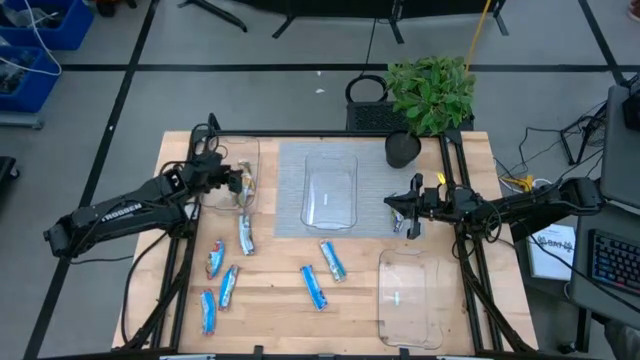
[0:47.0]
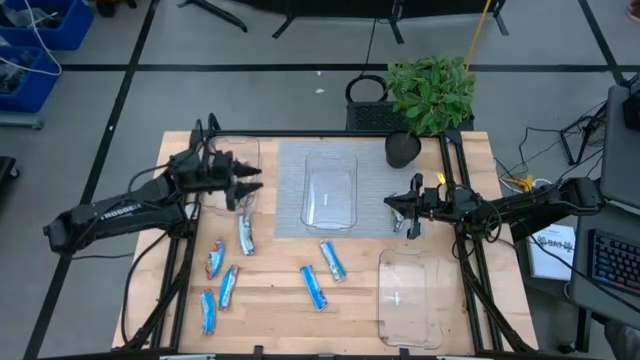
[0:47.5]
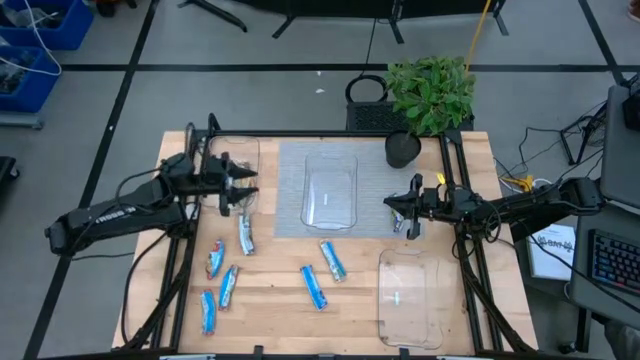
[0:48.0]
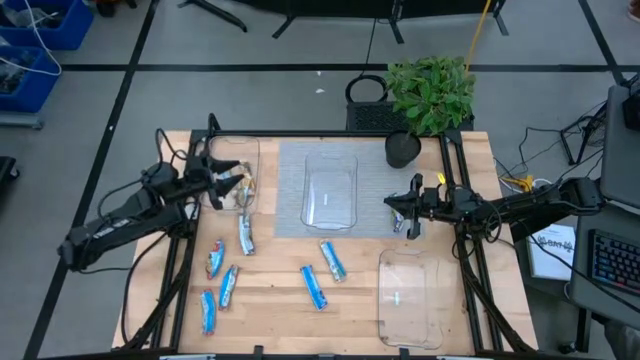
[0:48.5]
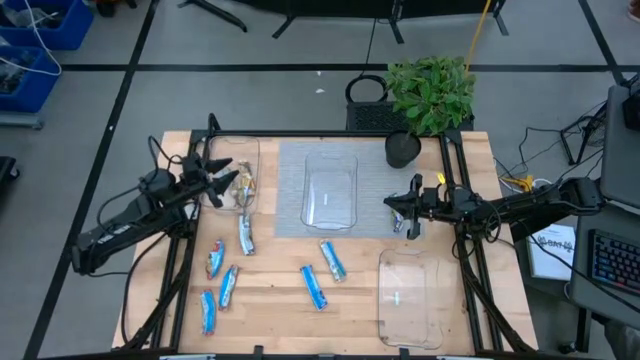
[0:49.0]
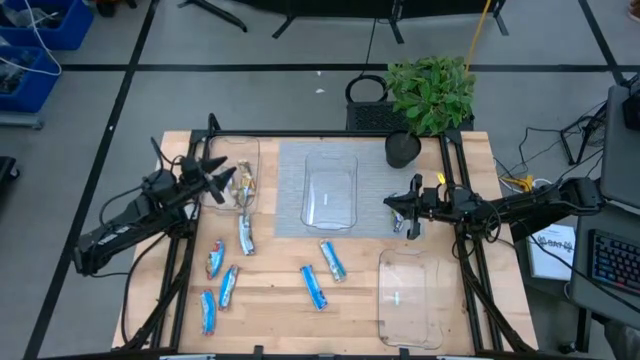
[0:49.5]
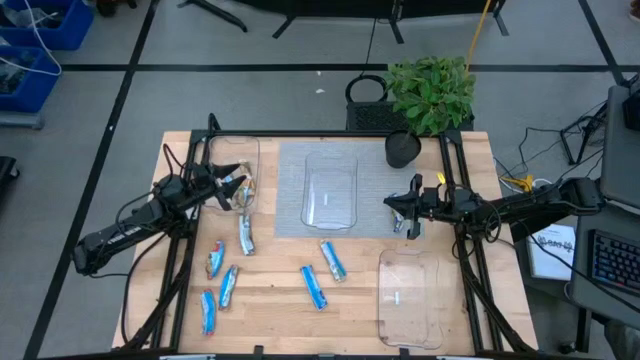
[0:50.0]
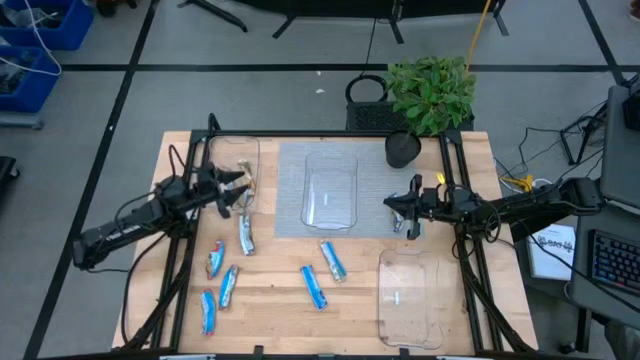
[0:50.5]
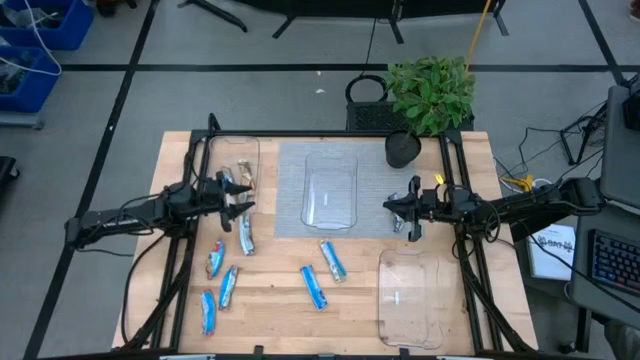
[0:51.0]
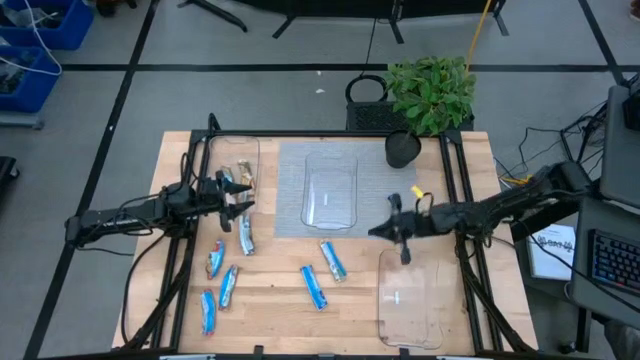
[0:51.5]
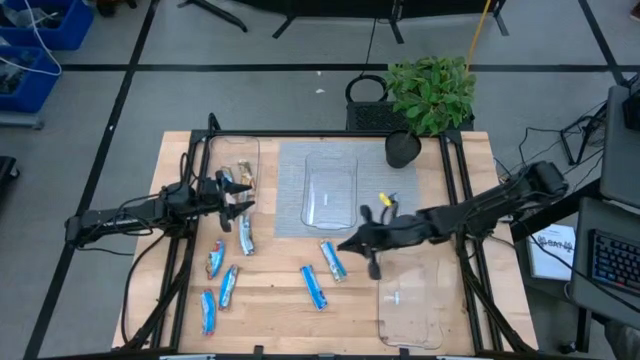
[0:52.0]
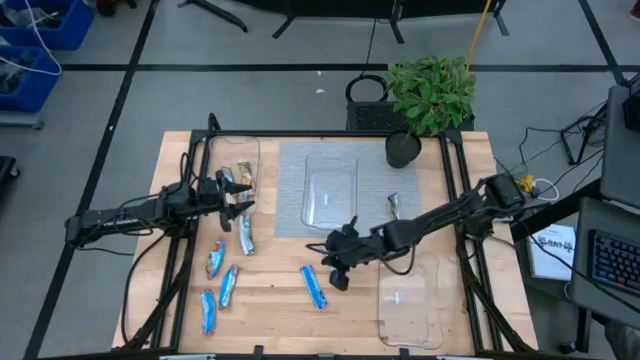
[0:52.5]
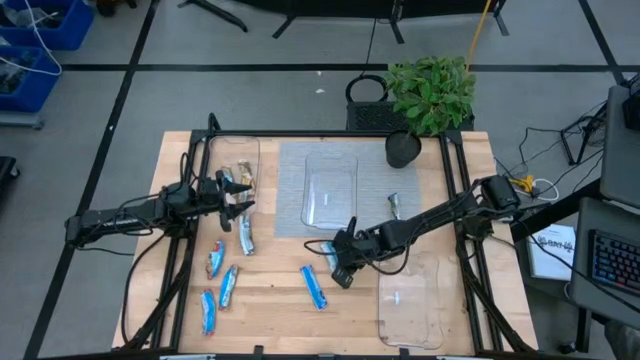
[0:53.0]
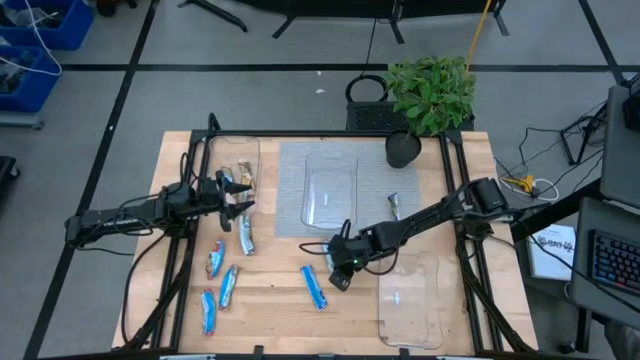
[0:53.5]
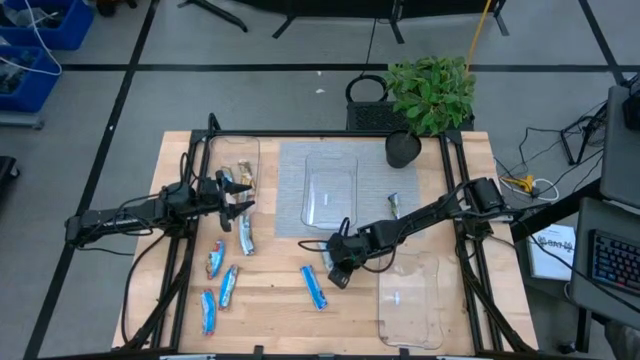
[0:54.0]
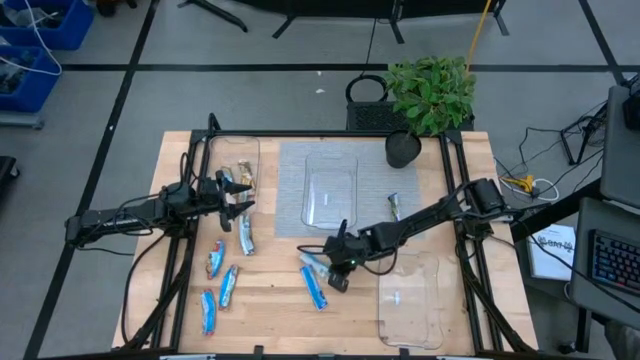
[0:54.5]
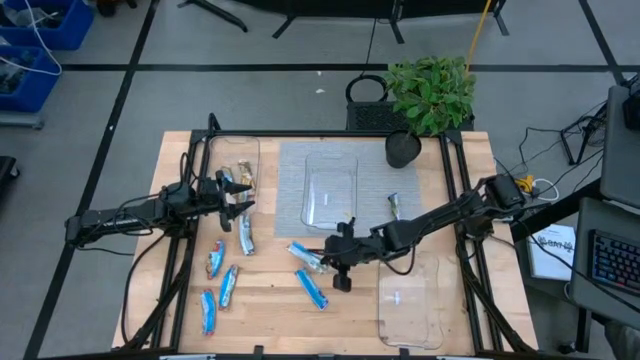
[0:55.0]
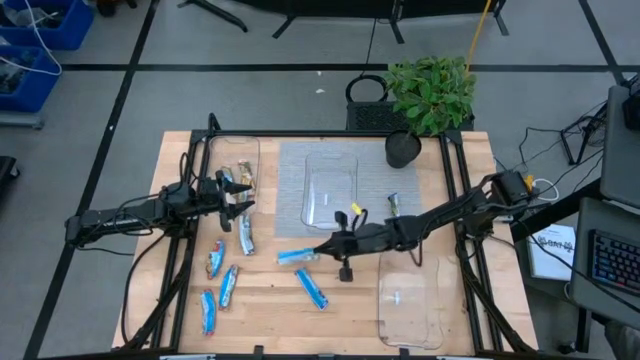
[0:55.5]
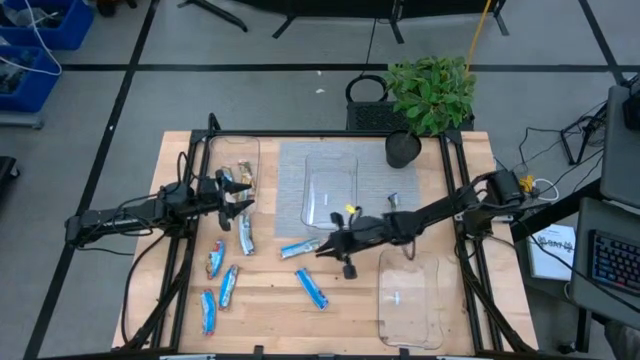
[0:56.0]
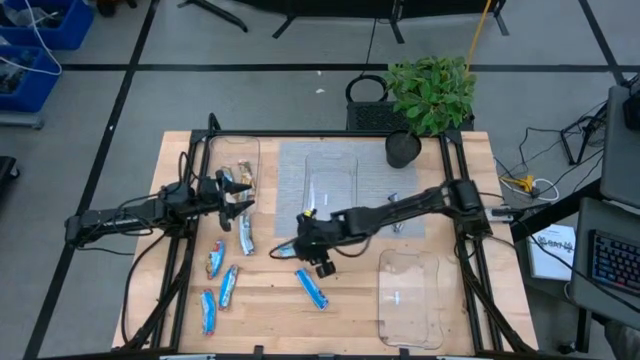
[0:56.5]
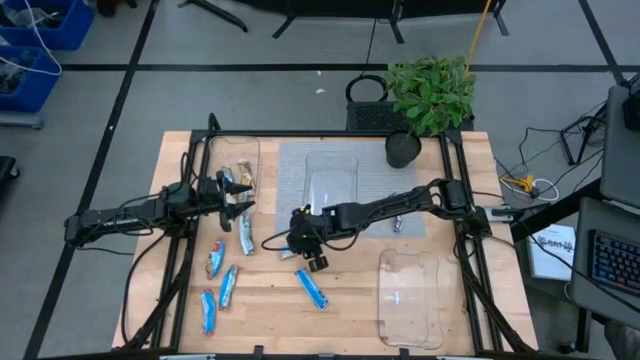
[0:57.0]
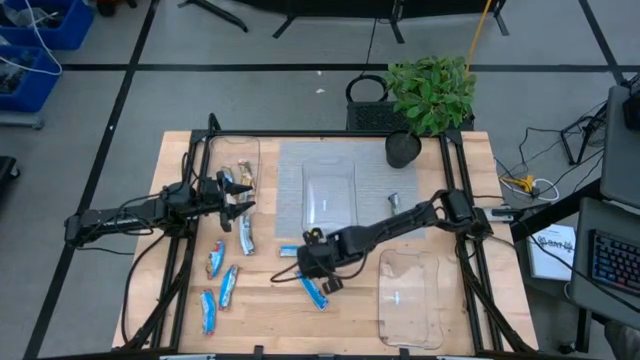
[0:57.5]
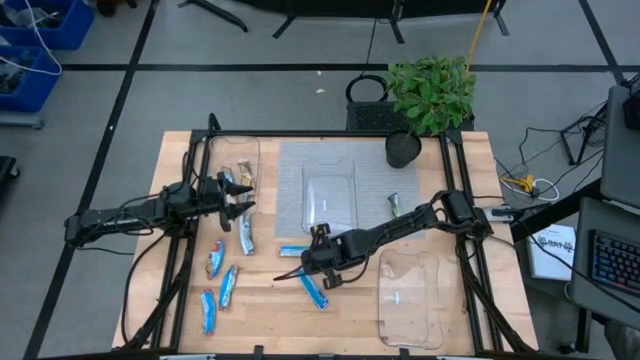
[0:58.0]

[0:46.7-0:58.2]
Task: Pick and place Granola Bars by type
Put the yellow granola bar into the top left transparent bin

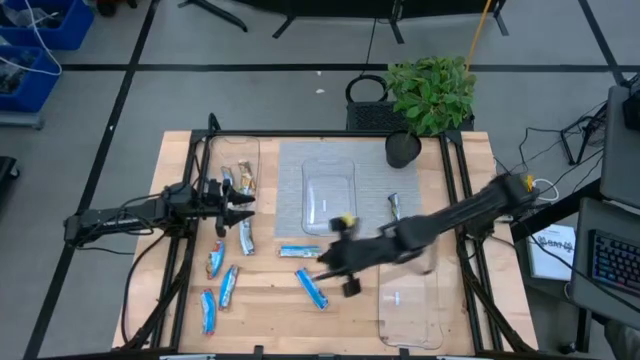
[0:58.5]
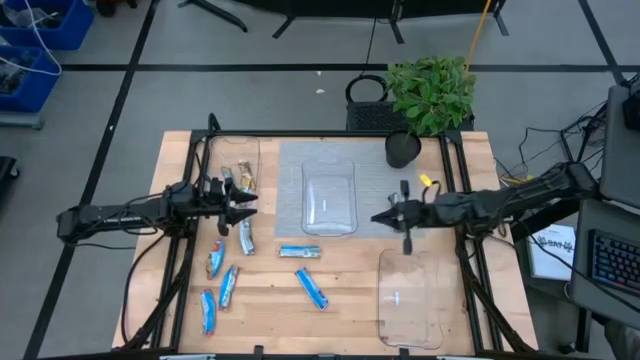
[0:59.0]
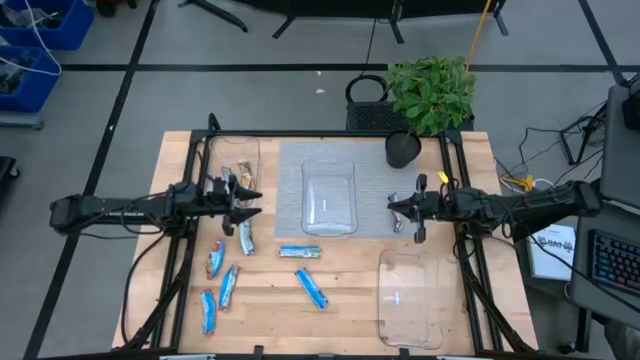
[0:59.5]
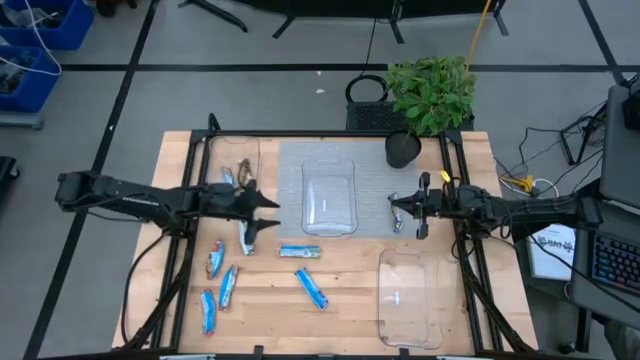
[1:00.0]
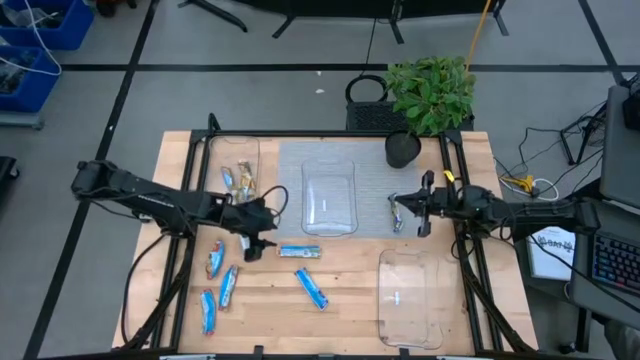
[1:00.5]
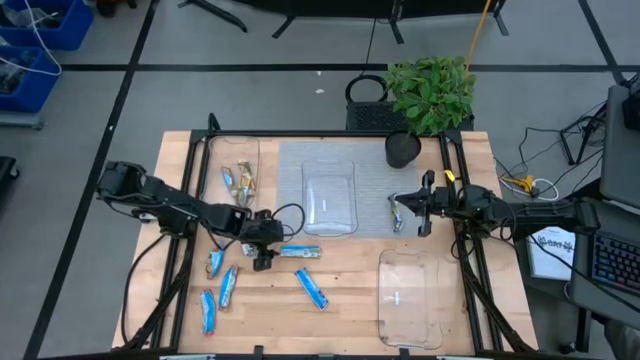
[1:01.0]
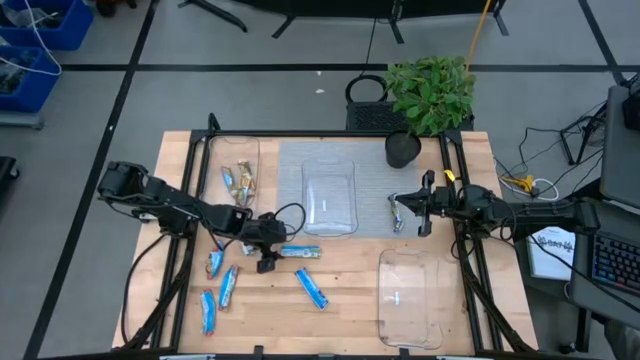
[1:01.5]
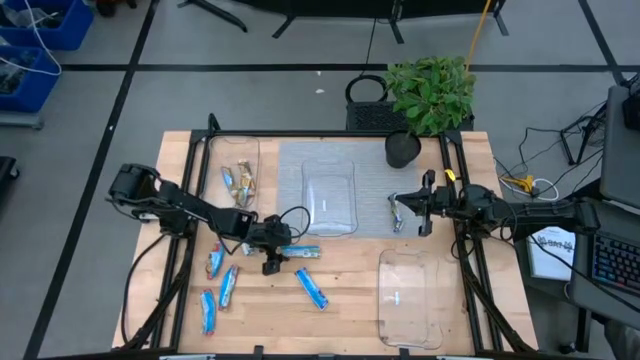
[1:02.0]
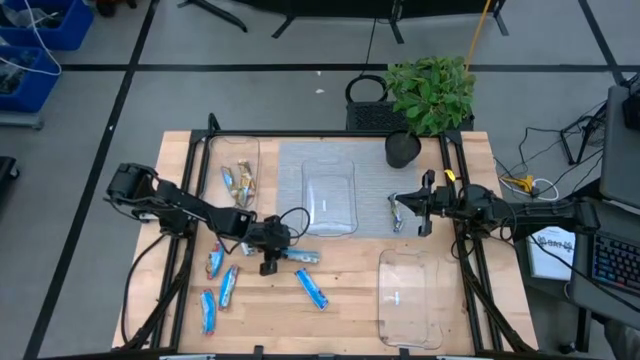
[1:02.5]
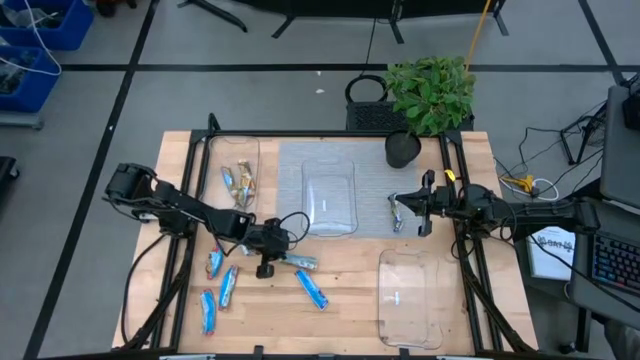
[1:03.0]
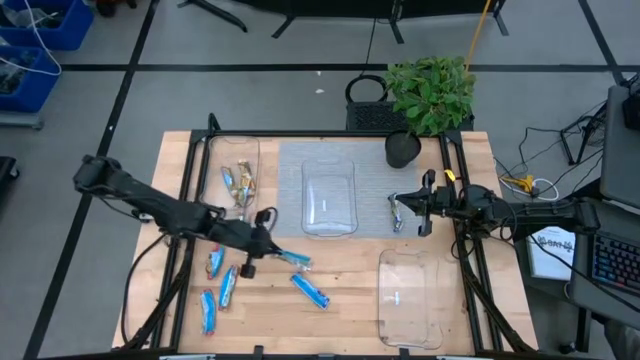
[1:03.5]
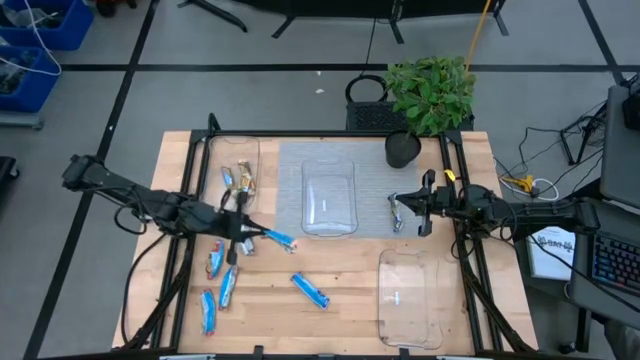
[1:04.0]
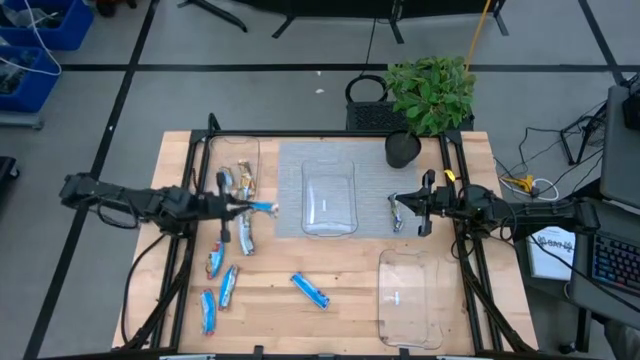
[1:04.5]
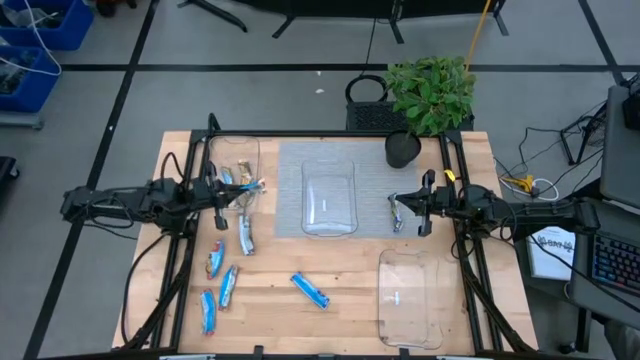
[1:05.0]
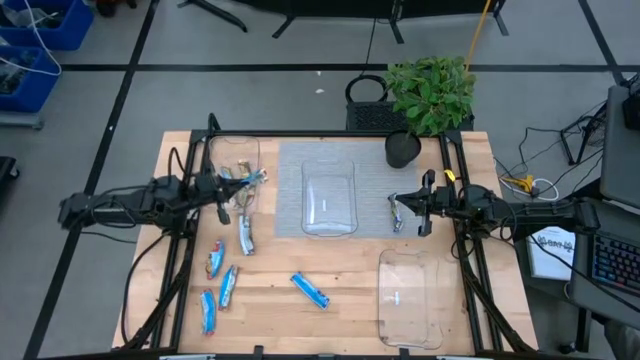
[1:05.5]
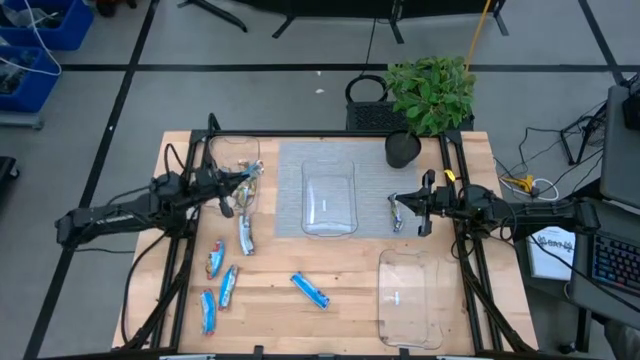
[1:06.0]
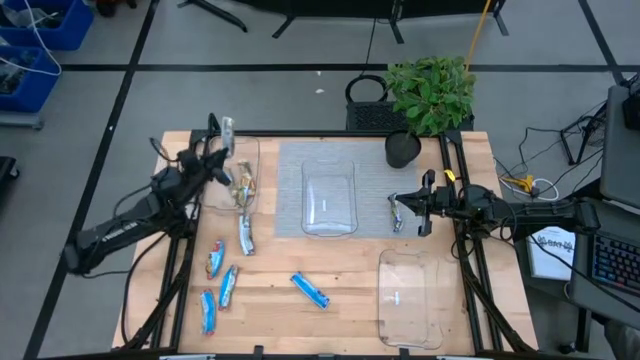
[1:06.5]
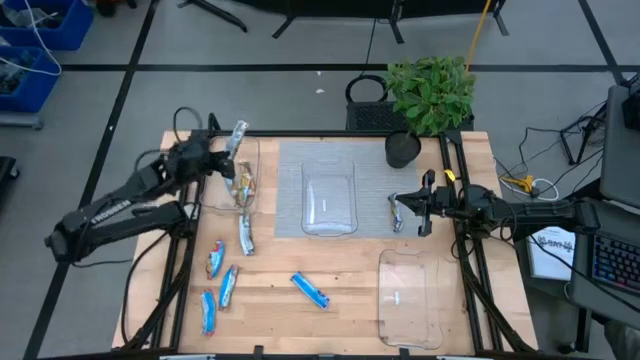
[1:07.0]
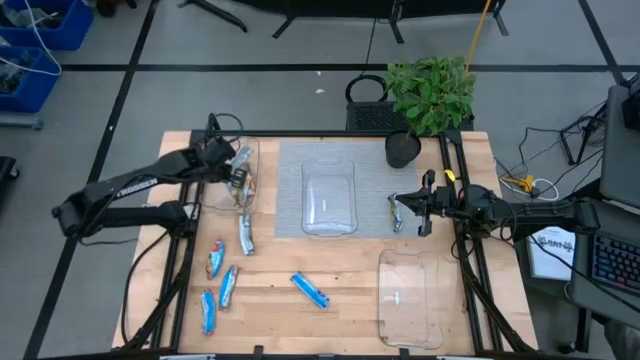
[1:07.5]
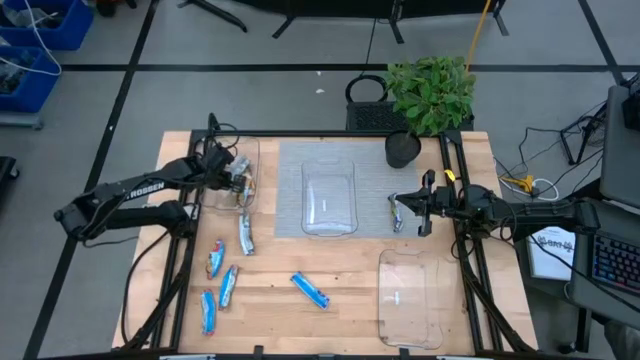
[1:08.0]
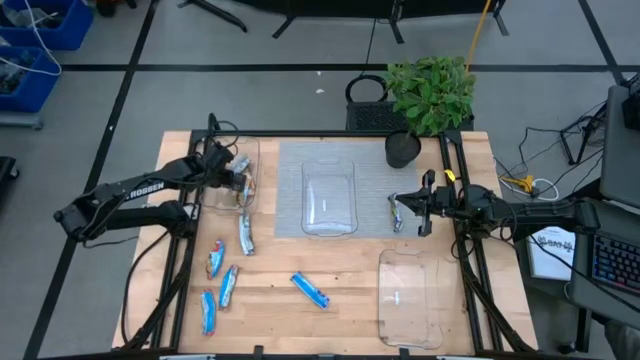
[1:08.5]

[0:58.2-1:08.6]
Put the yellow granola bar into the top left transparent bin
